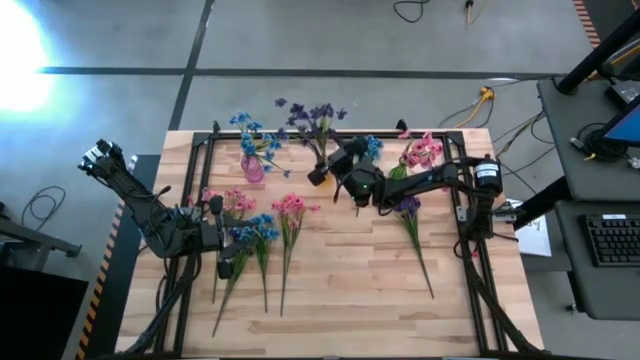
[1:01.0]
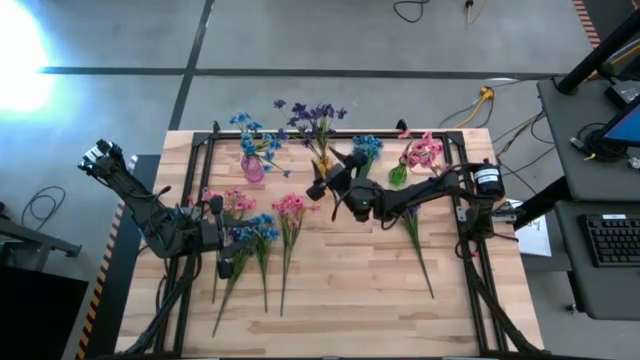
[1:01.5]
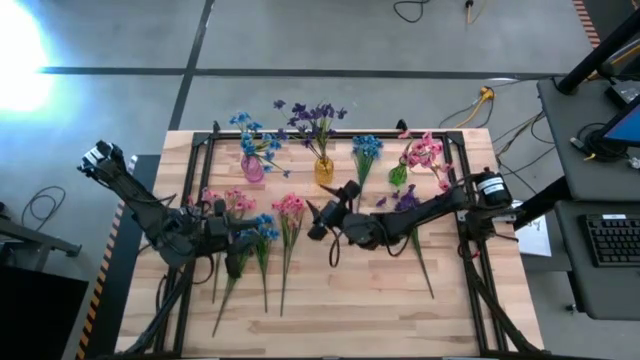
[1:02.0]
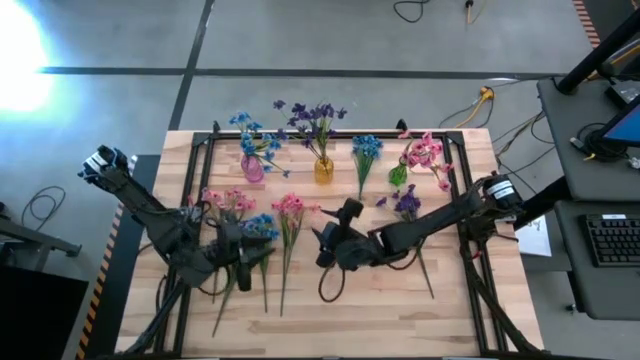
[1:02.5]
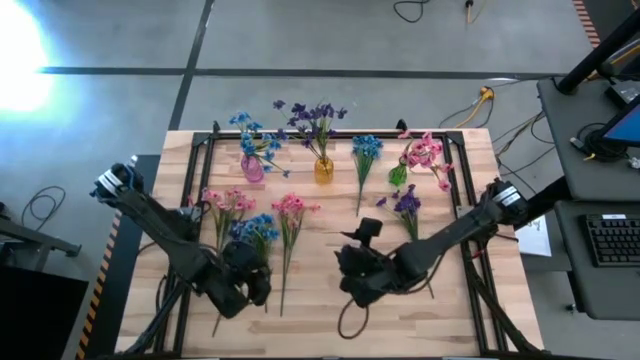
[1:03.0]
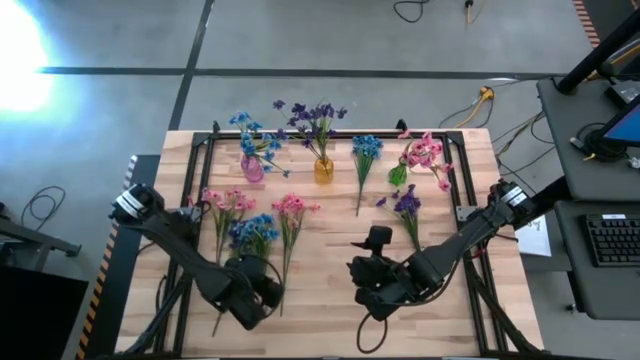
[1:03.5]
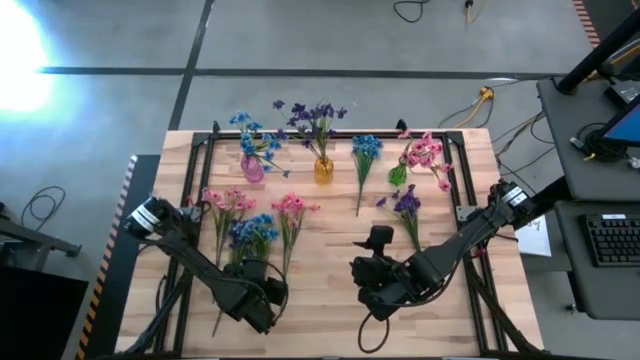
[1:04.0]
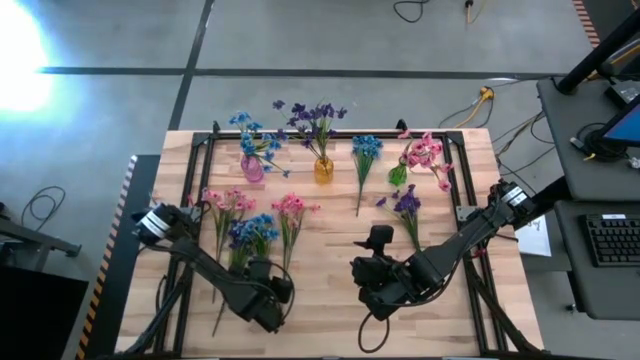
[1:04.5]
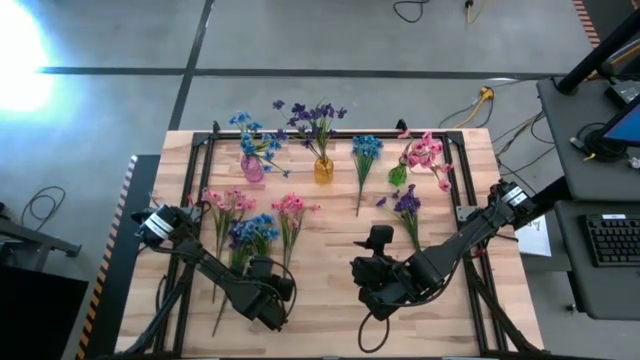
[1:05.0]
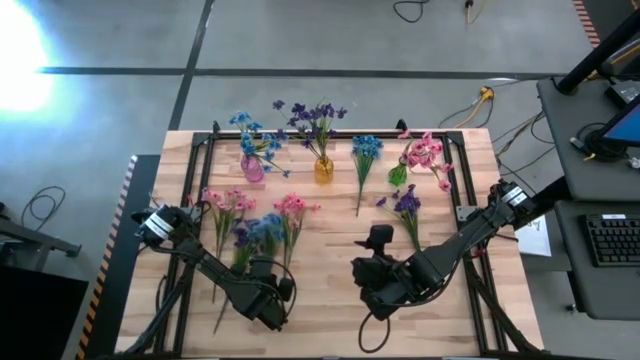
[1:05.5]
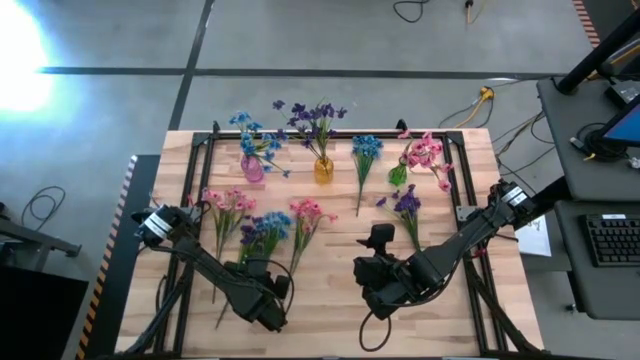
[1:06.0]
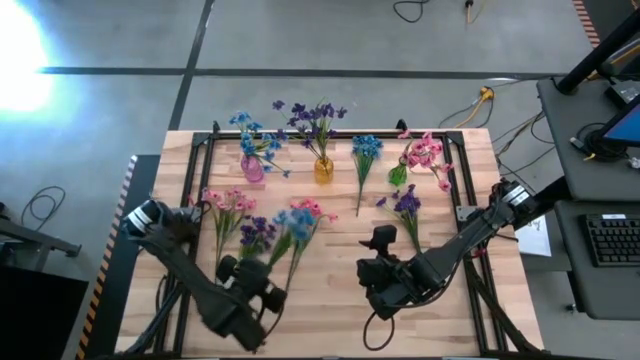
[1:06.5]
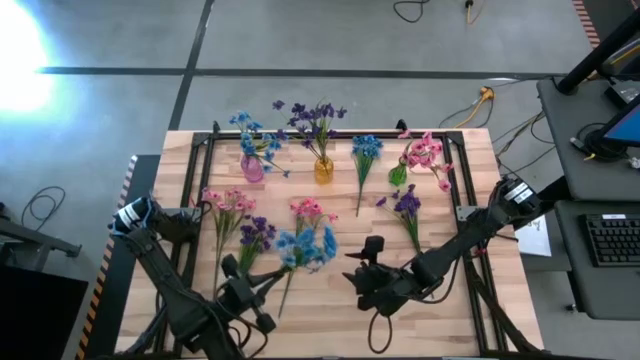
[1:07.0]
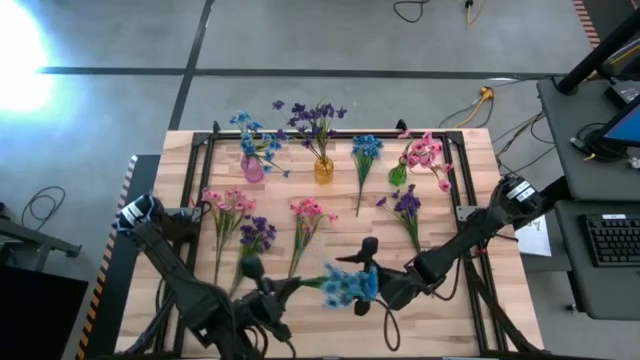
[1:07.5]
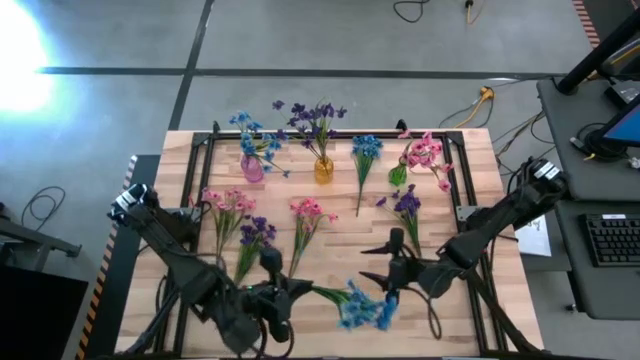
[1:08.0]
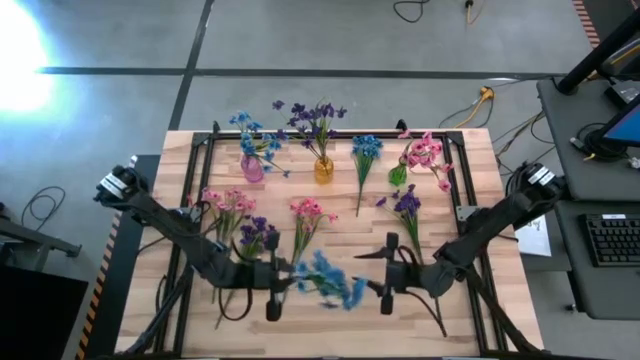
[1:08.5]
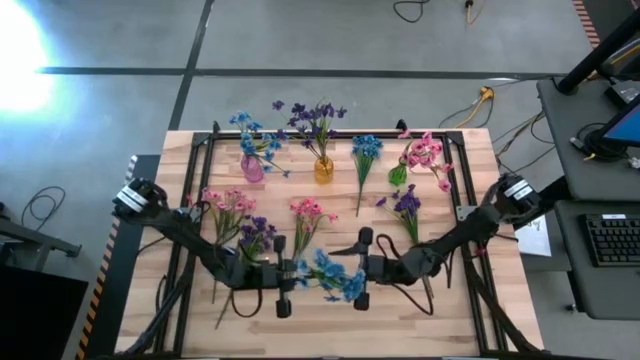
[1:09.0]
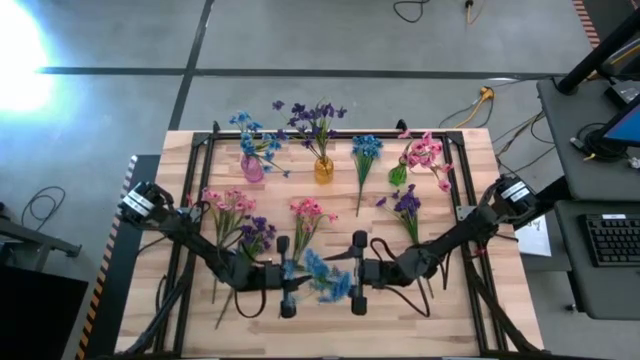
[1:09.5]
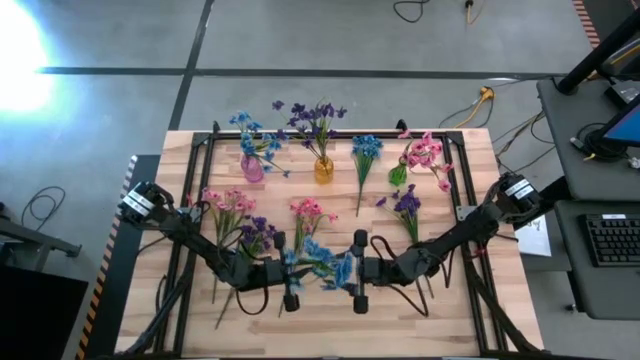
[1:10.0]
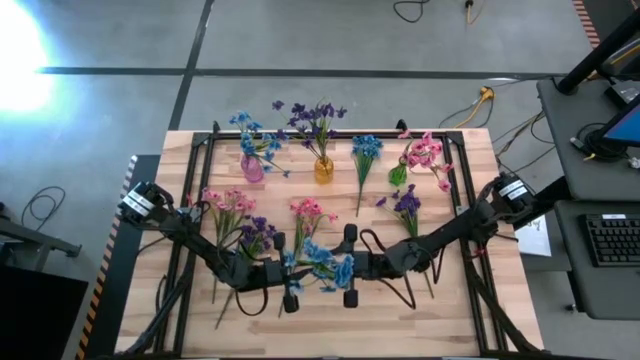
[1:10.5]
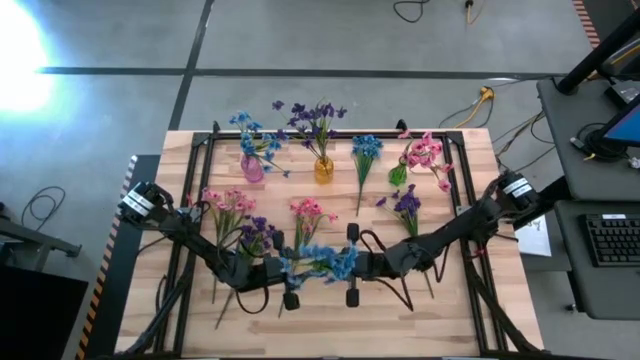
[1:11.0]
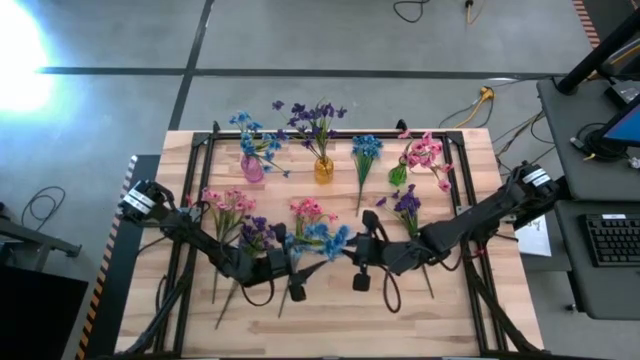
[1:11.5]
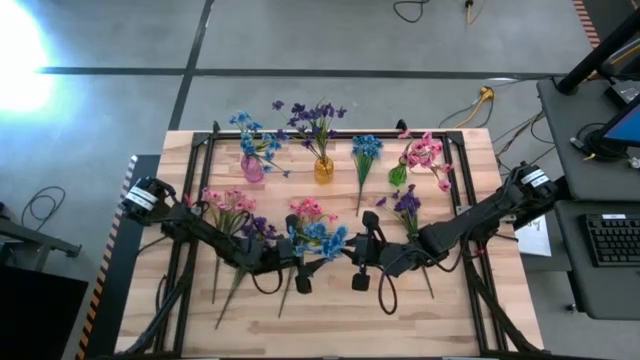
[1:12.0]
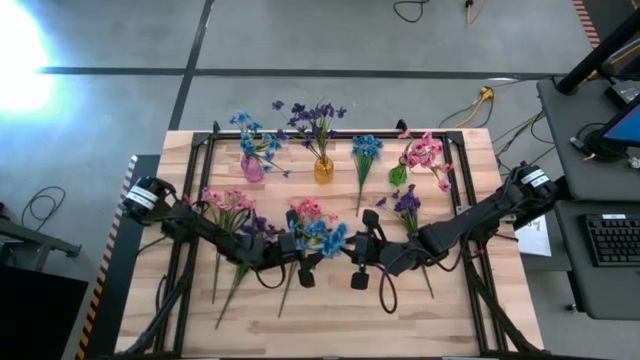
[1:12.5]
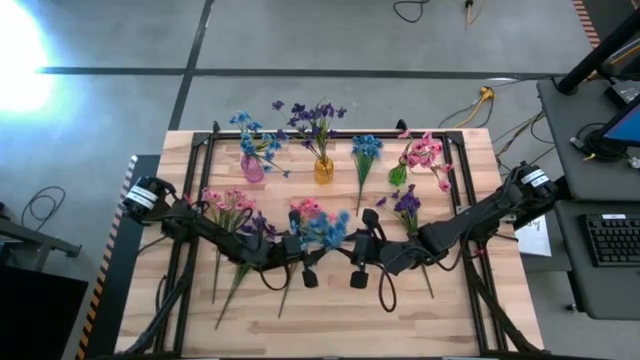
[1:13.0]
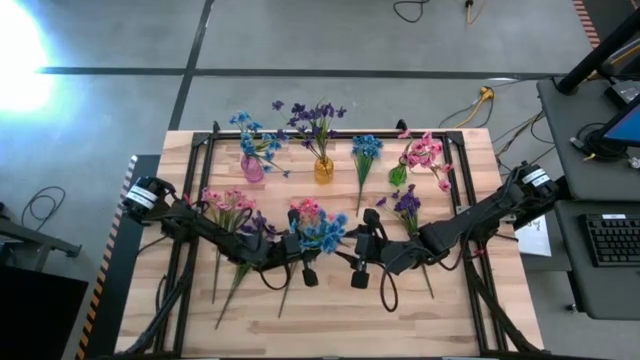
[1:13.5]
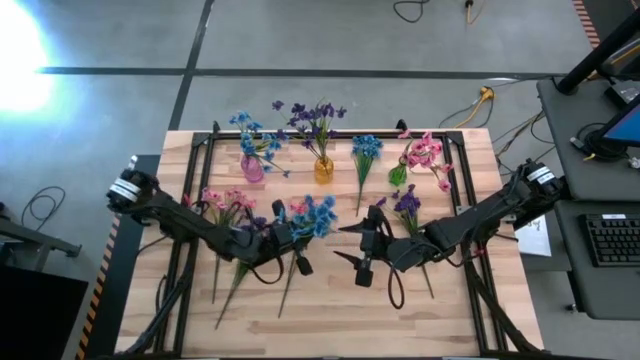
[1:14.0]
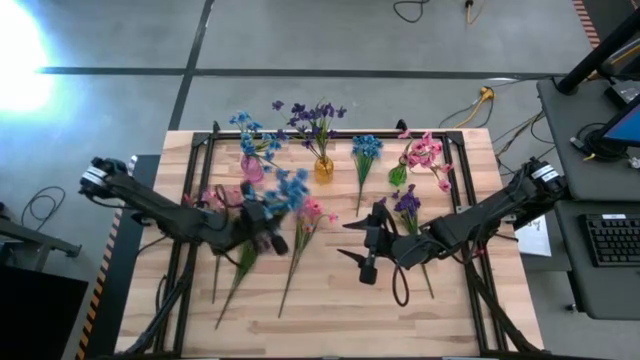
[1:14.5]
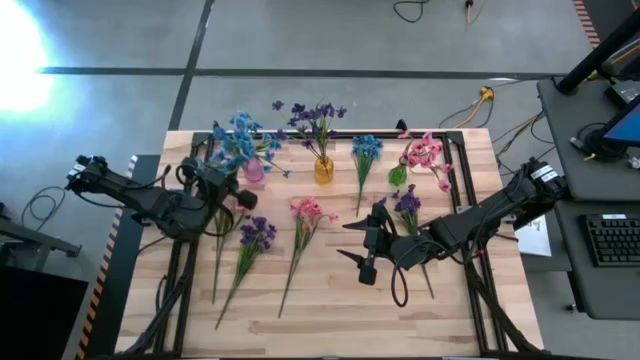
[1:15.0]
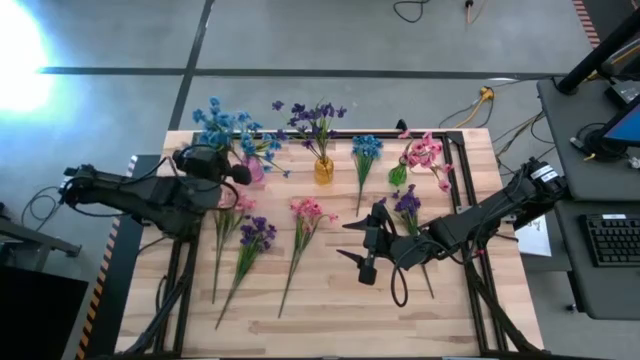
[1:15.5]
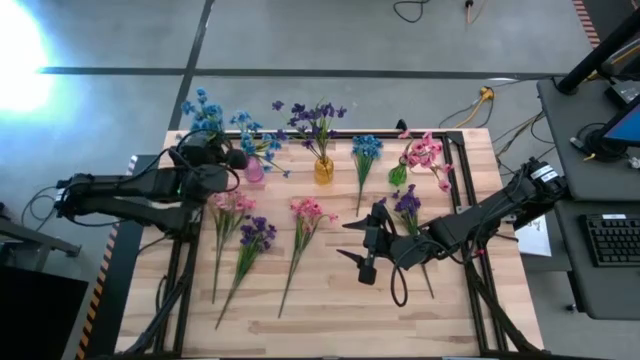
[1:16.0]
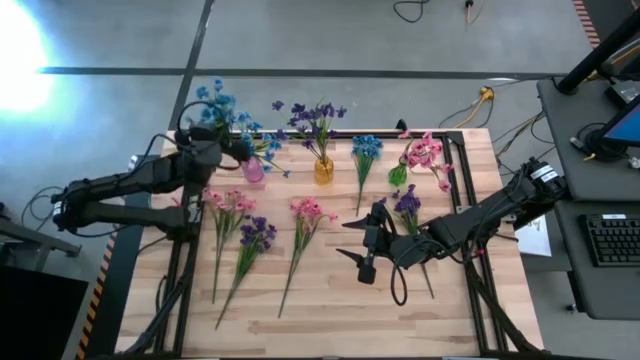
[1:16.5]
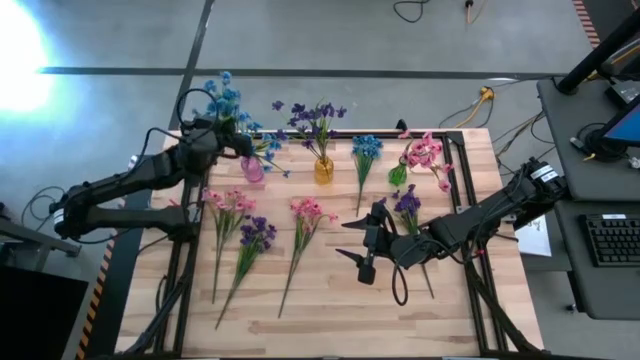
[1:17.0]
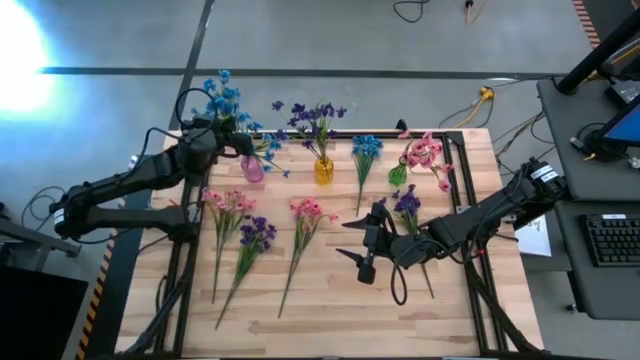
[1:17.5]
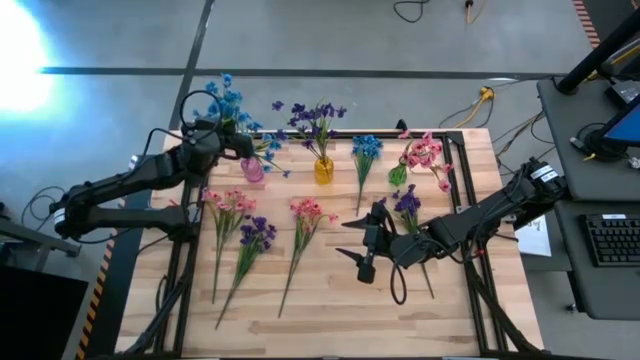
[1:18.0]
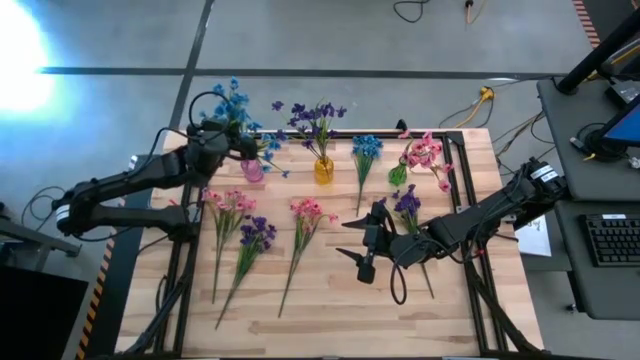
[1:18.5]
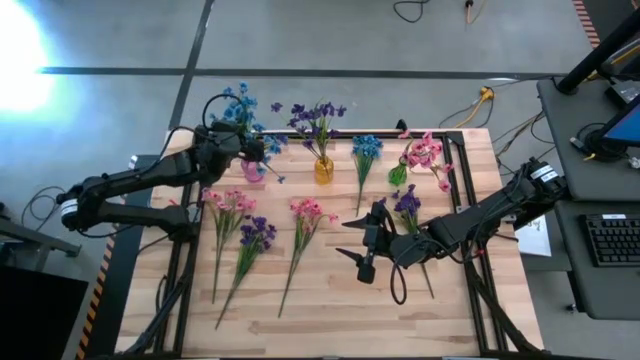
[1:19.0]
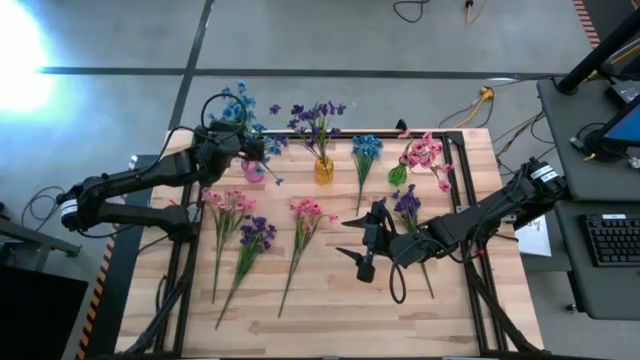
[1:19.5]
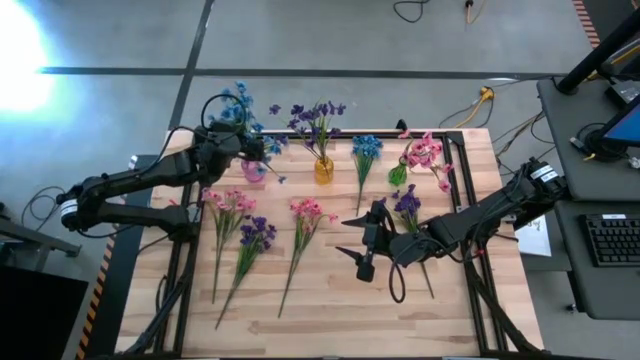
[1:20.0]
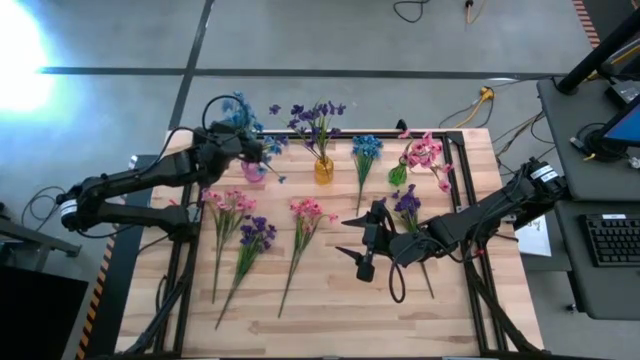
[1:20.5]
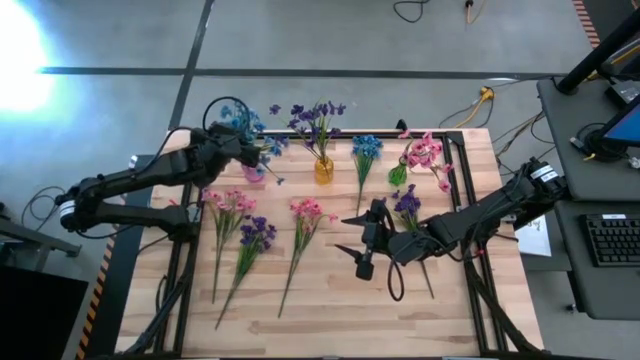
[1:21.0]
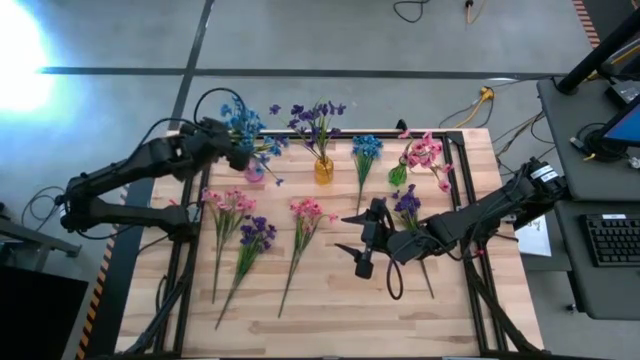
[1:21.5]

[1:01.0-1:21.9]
Task: Sort flowers into vase by color
Put the left blue flowers into the violet vase
